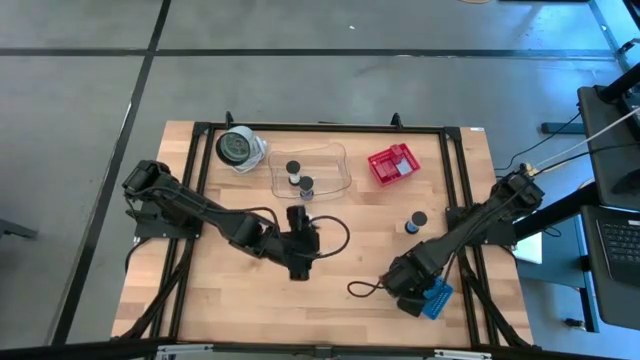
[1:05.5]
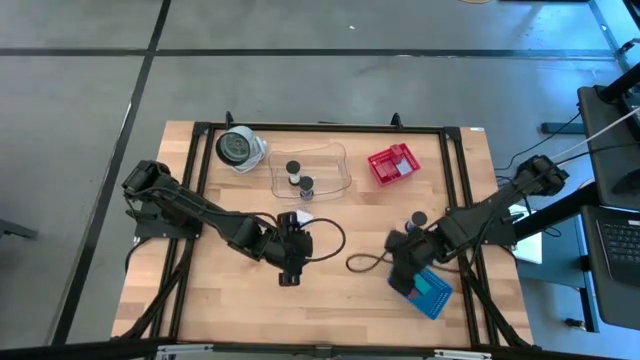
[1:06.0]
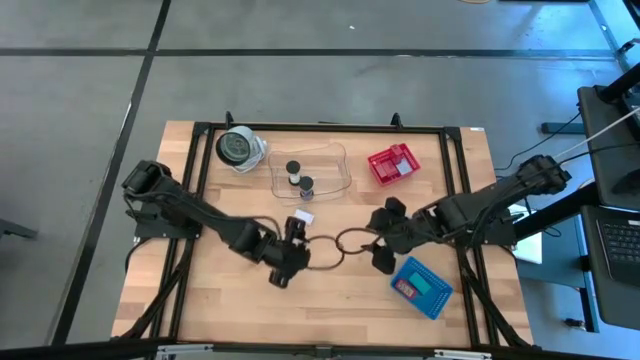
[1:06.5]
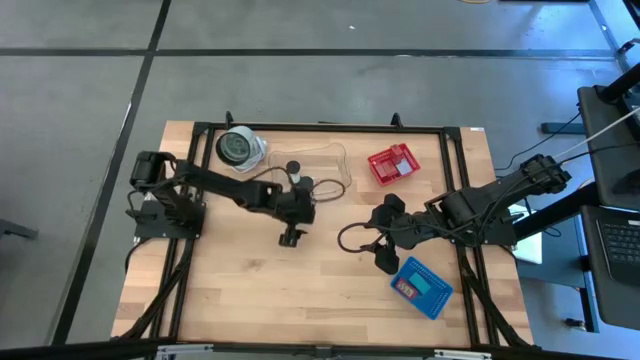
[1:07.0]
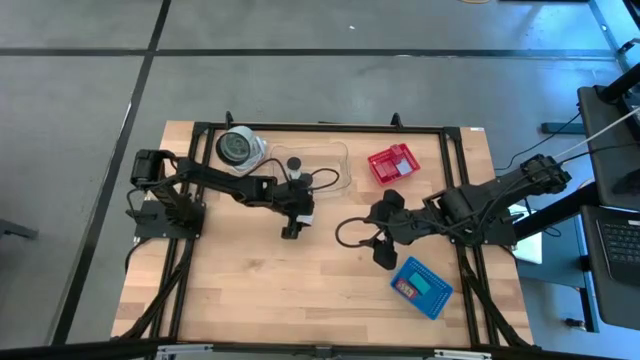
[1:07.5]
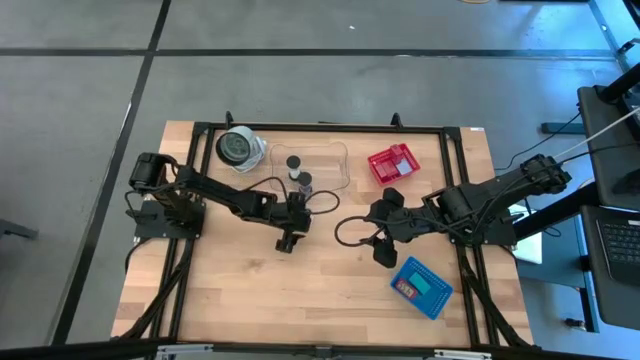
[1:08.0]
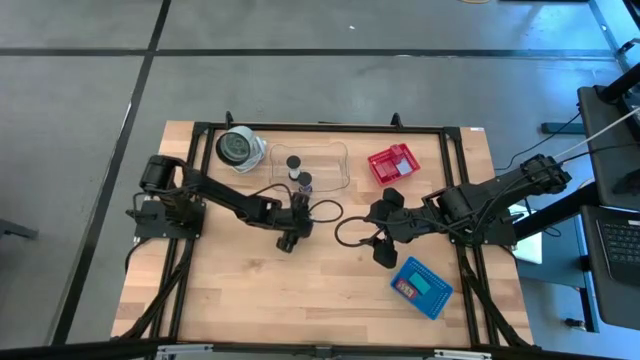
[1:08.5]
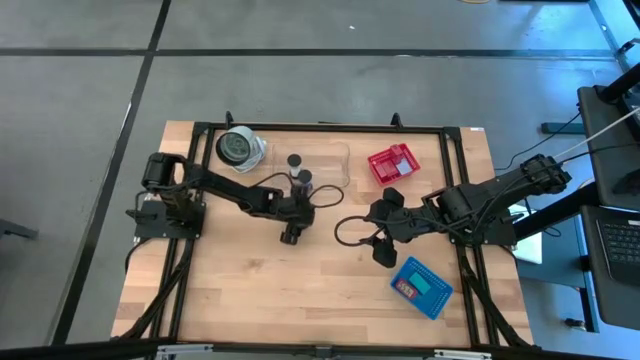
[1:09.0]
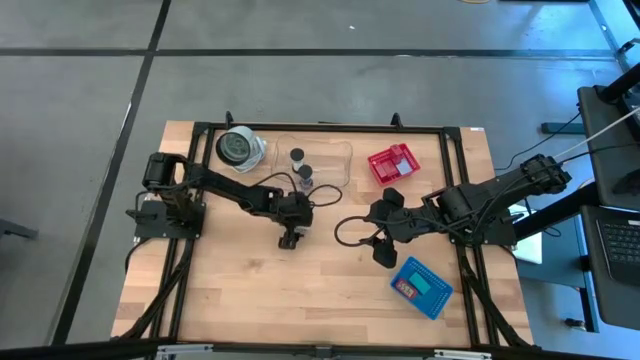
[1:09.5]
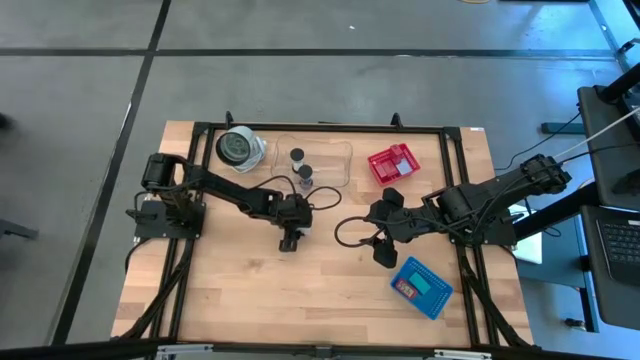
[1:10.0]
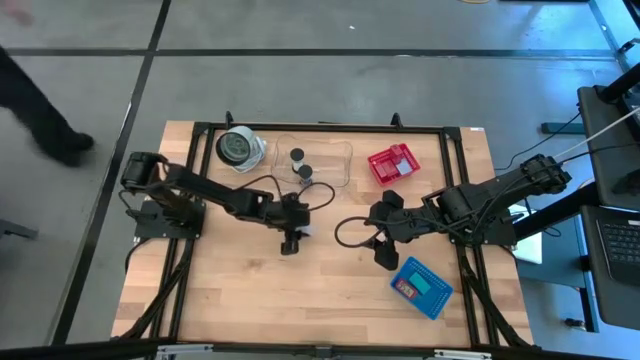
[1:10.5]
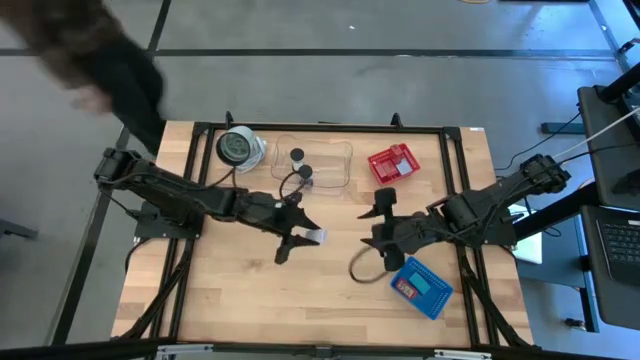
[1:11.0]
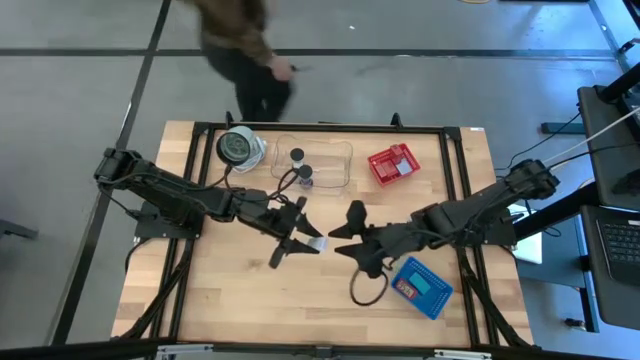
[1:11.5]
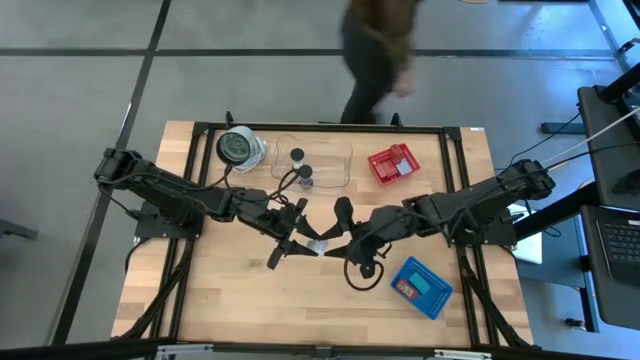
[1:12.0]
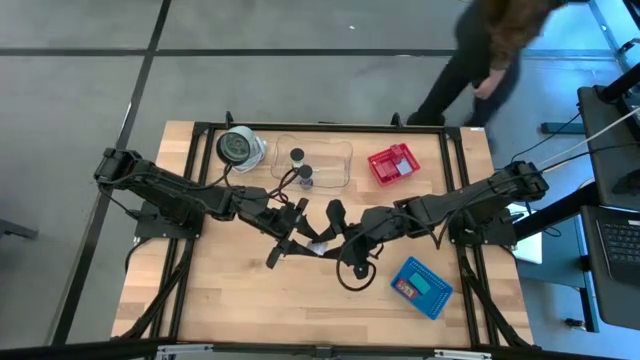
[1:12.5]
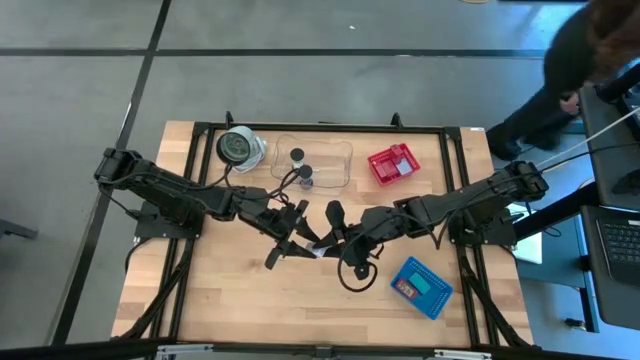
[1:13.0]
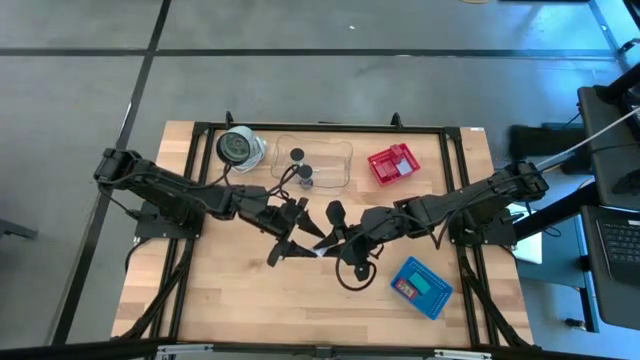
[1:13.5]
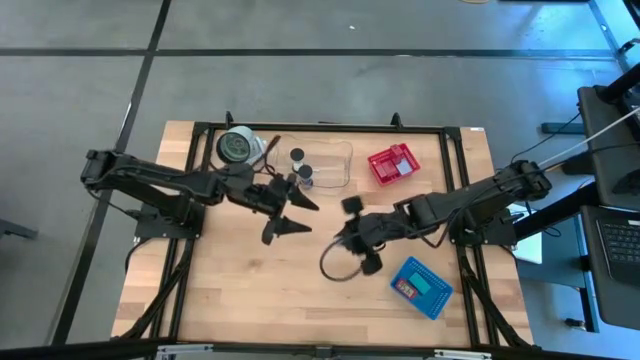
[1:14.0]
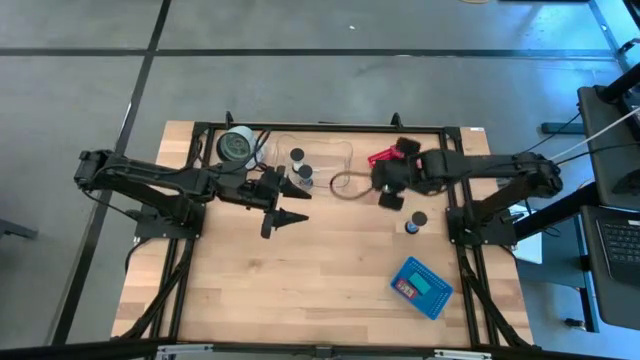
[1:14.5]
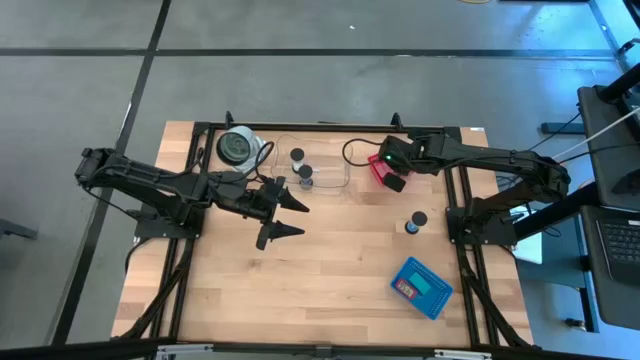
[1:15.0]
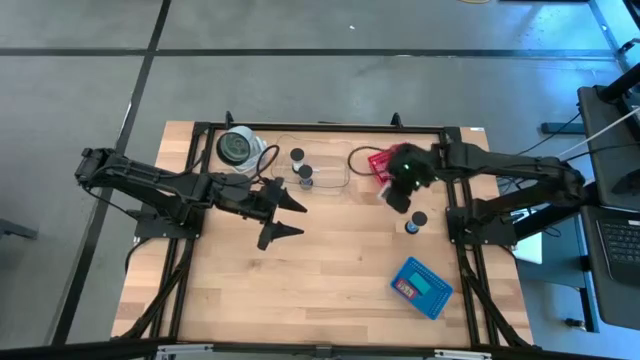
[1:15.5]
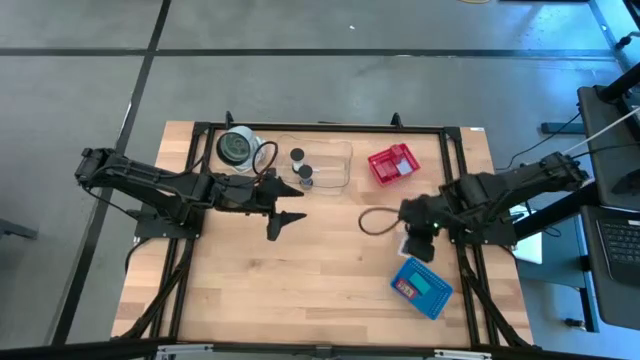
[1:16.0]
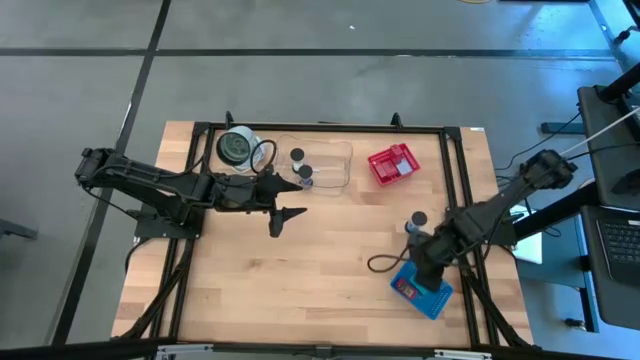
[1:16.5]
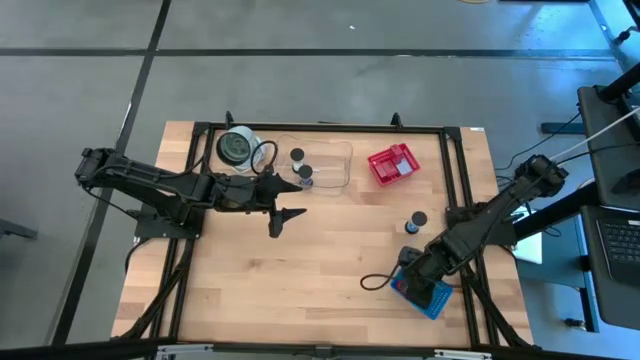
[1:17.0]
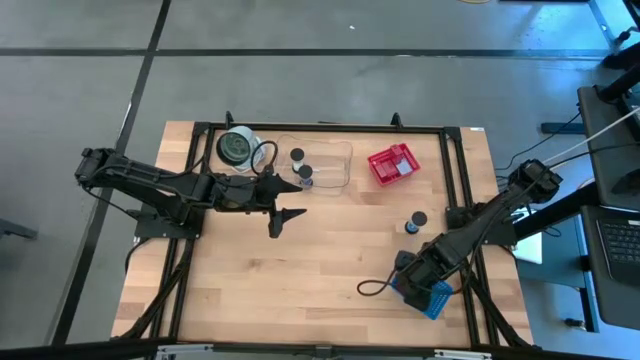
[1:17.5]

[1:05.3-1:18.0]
Task: Pick & Place Office items
Put the white digital timer into the blue bin

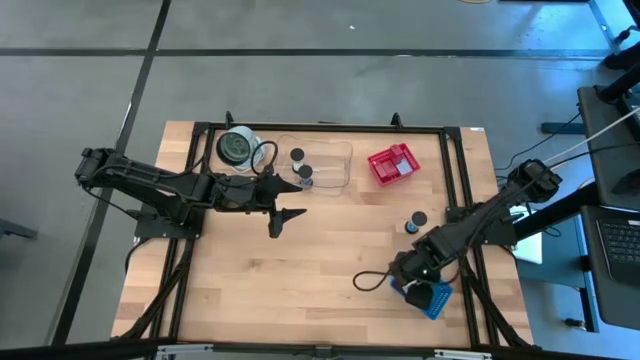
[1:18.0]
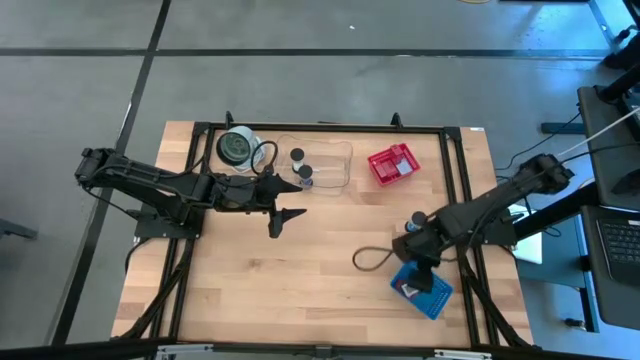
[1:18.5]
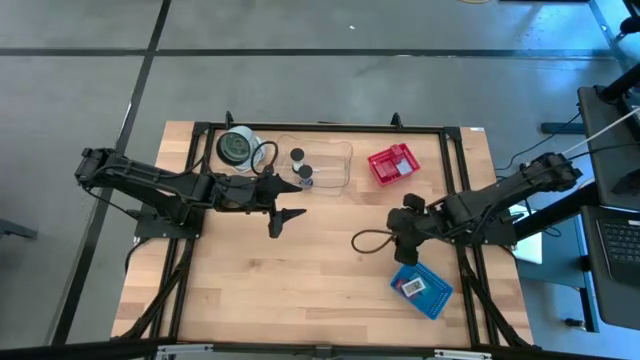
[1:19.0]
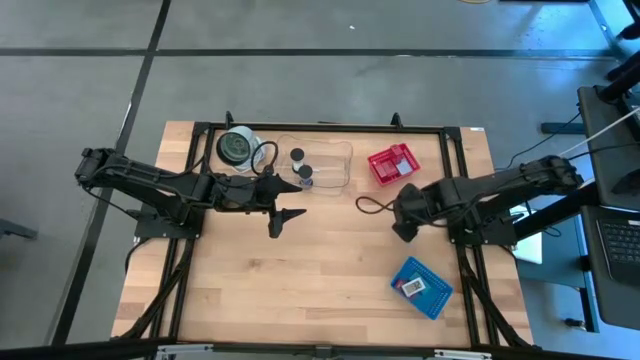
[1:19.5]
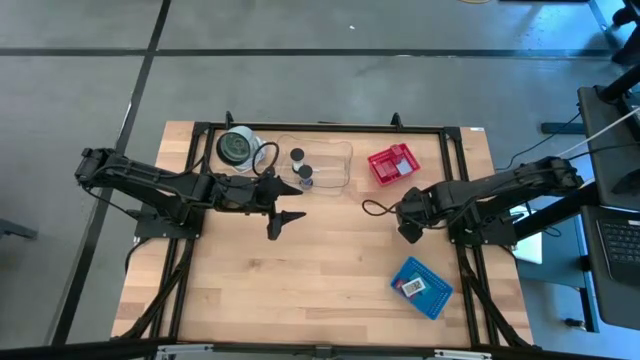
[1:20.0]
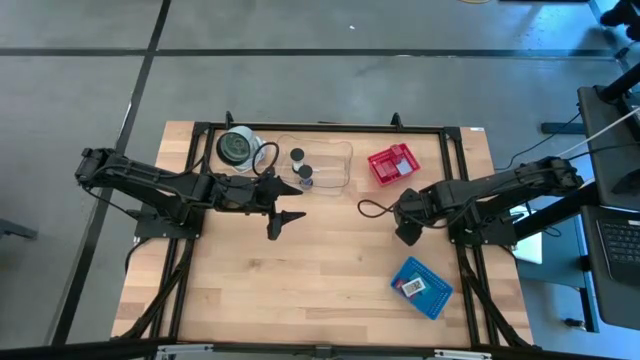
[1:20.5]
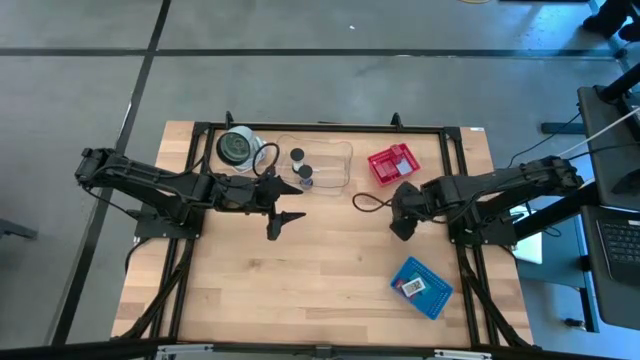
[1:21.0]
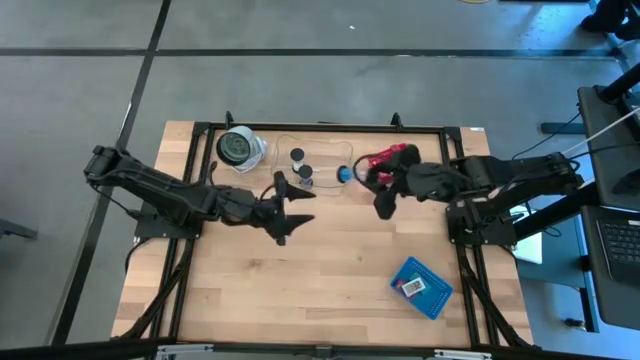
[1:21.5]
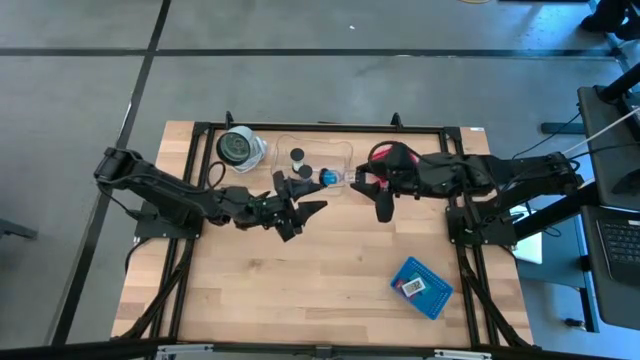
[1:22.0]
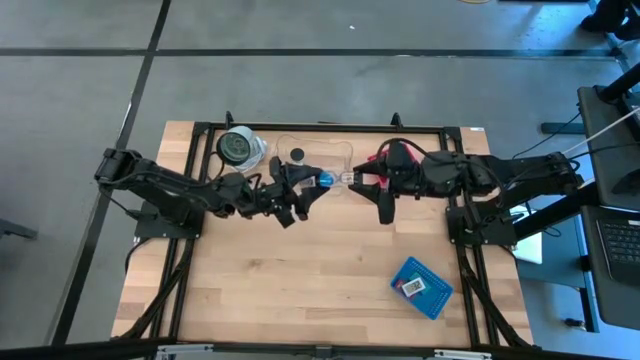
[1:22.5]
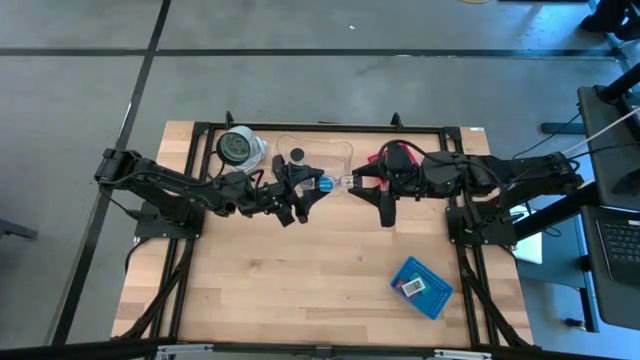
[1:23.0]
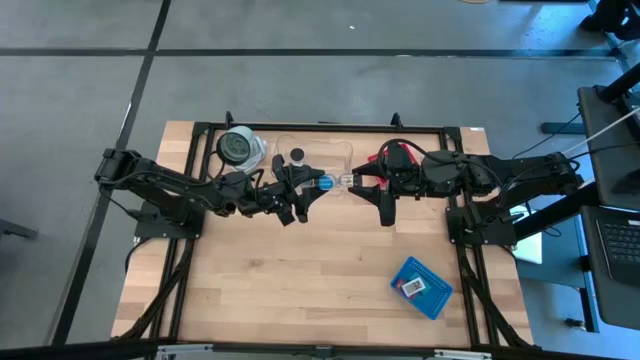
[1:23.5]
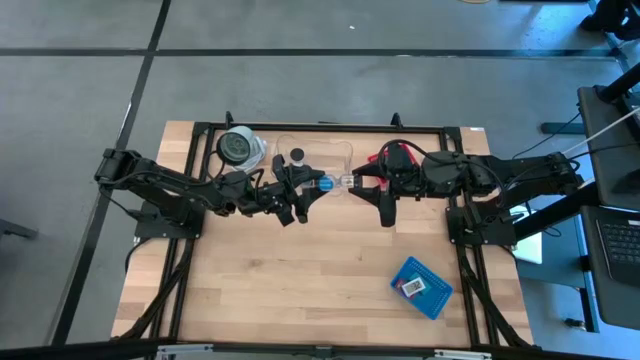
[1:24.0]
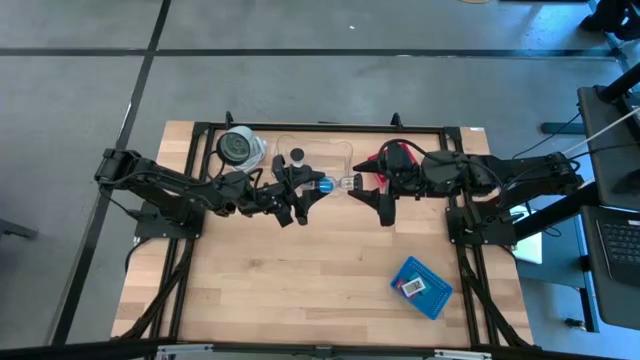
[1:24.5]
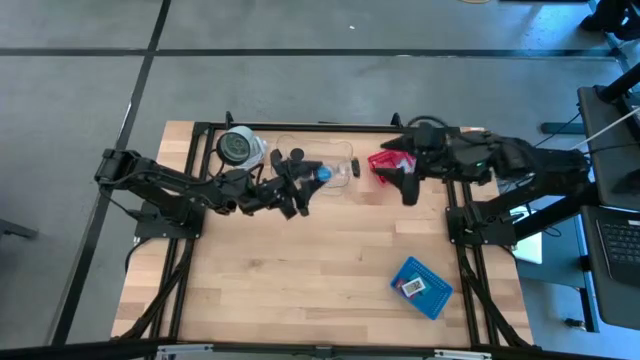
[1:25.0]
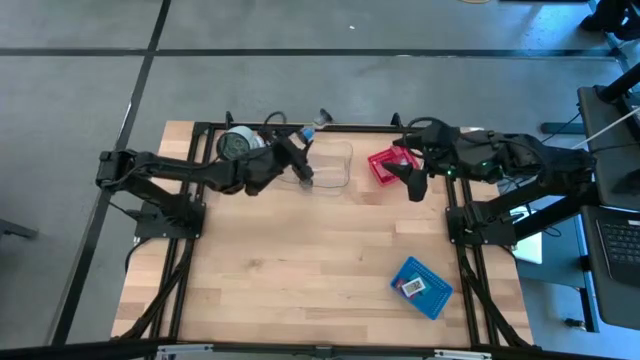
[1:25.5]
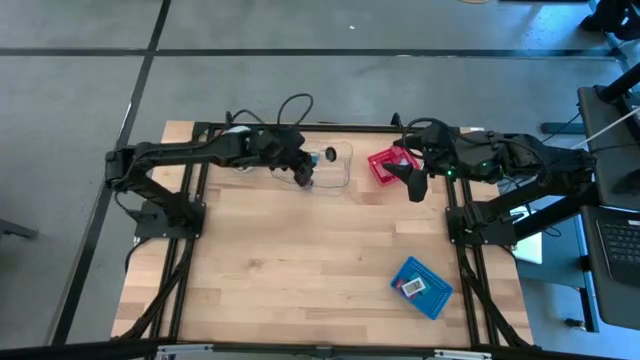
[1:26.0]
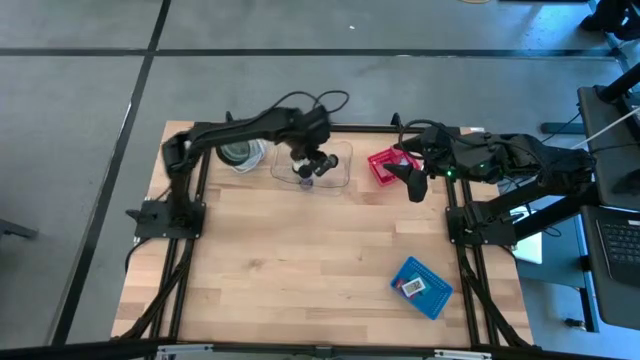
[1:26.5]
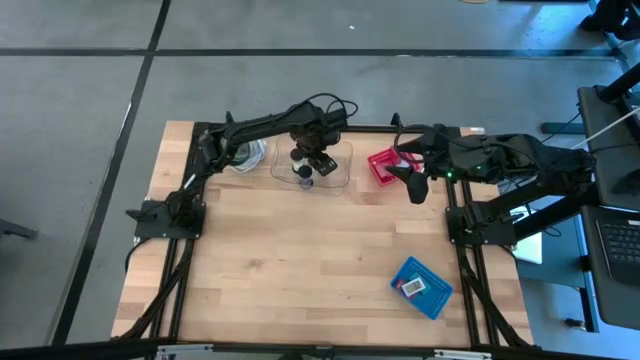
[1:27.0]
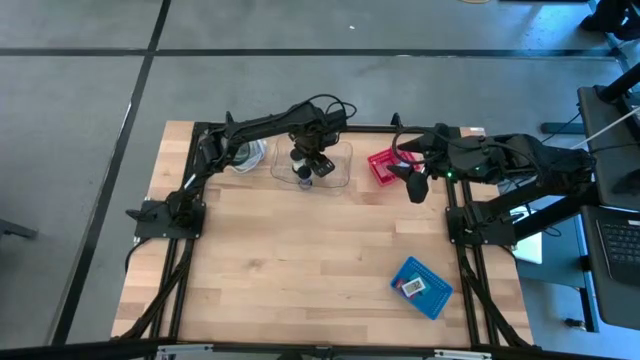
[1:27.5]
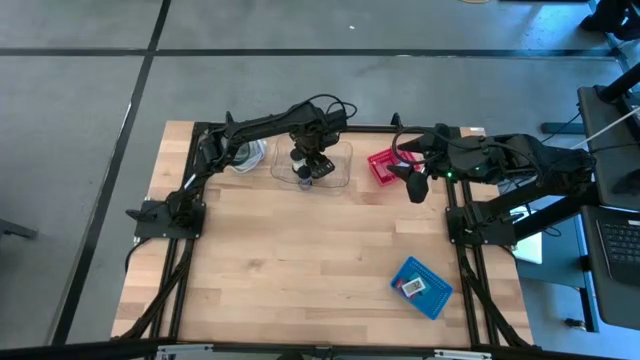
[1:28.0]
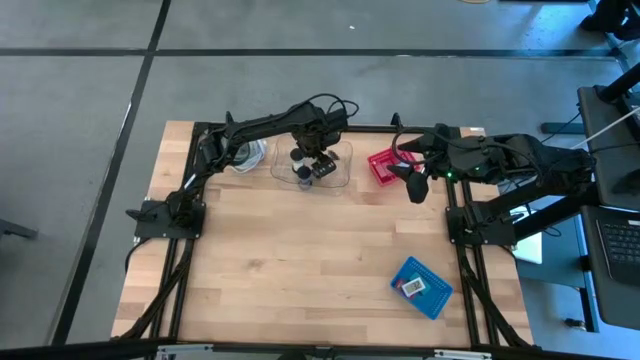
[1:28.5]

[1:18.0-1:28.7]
Put the light blue hourglass into the transparent bin
